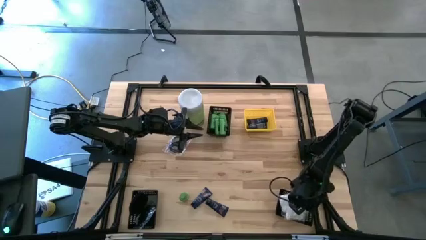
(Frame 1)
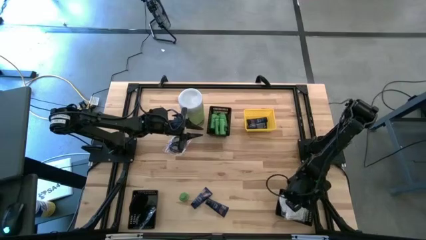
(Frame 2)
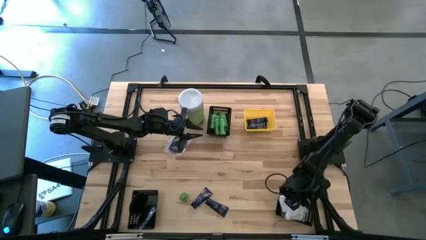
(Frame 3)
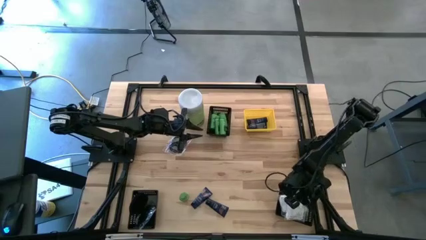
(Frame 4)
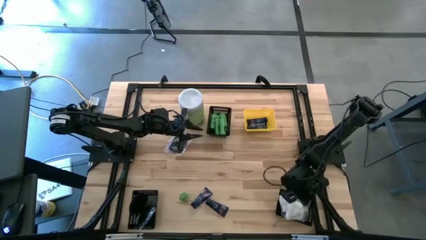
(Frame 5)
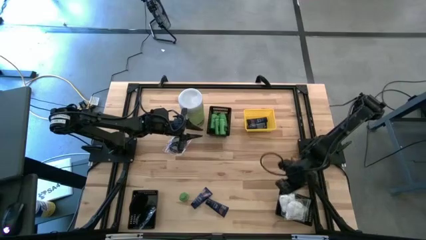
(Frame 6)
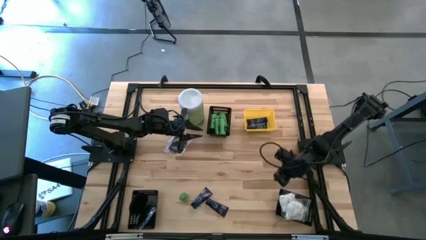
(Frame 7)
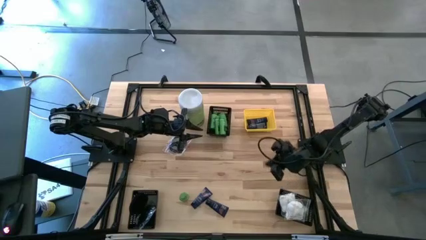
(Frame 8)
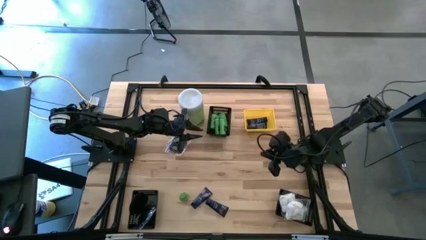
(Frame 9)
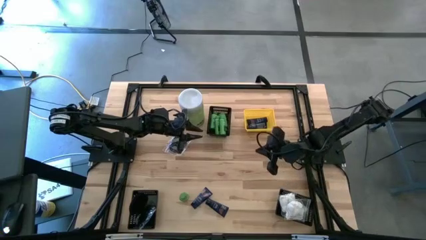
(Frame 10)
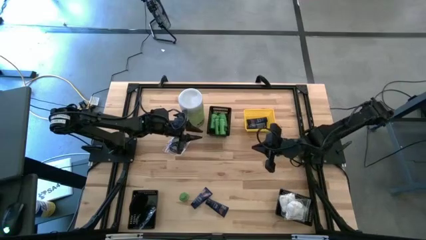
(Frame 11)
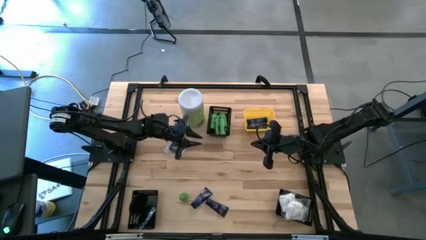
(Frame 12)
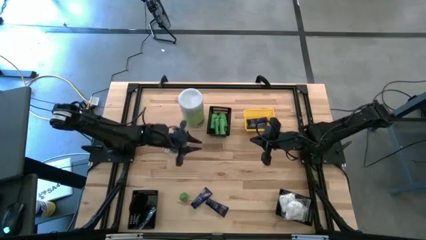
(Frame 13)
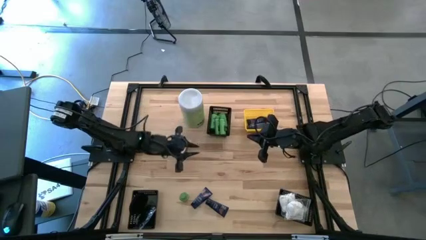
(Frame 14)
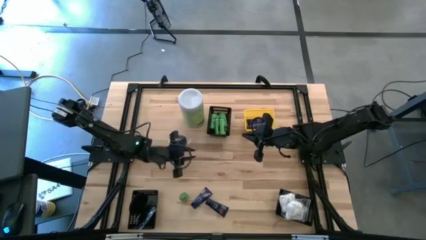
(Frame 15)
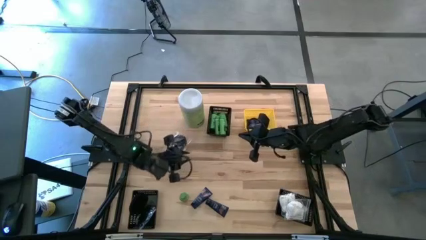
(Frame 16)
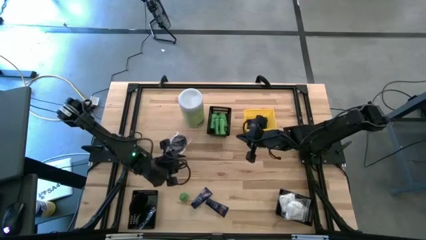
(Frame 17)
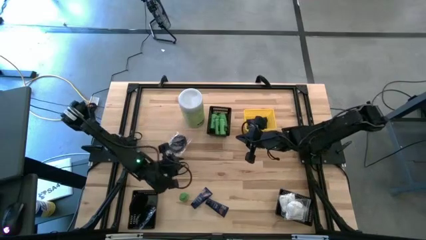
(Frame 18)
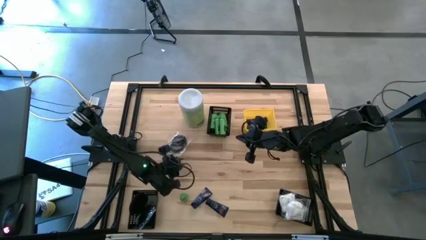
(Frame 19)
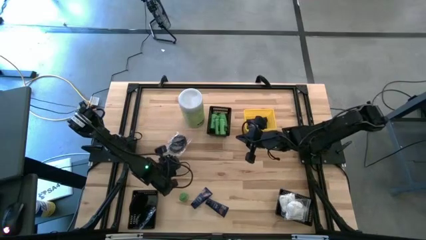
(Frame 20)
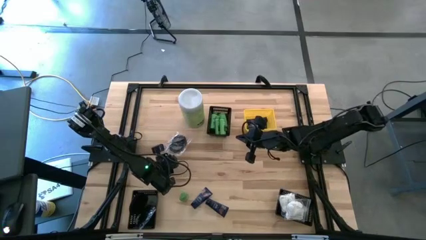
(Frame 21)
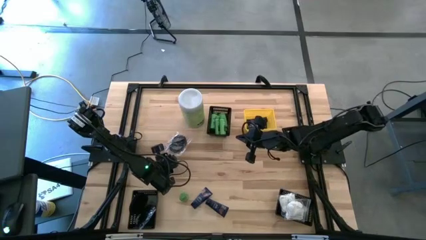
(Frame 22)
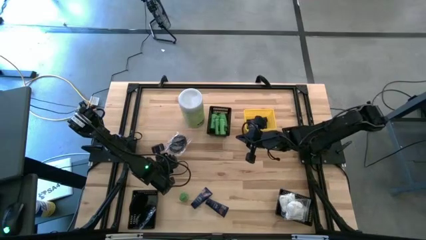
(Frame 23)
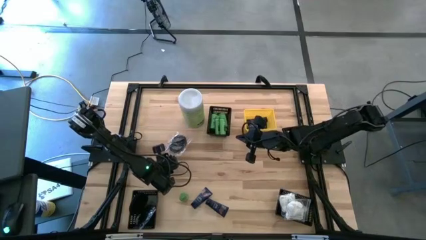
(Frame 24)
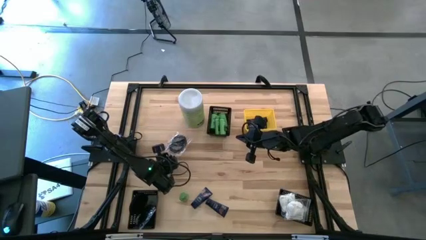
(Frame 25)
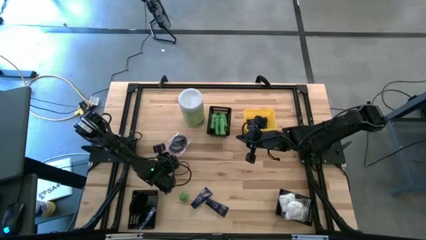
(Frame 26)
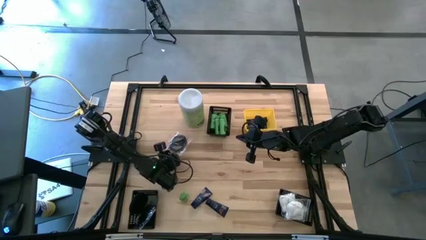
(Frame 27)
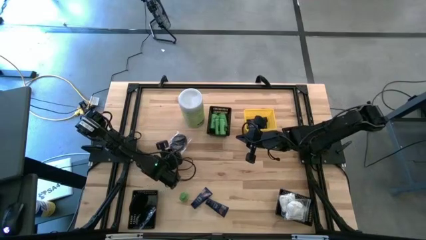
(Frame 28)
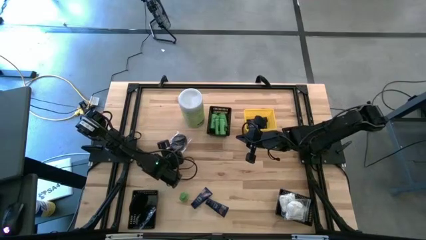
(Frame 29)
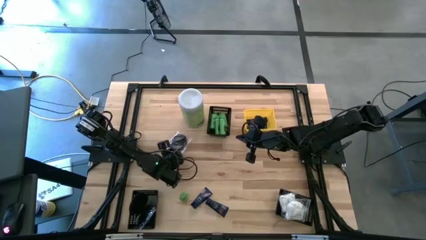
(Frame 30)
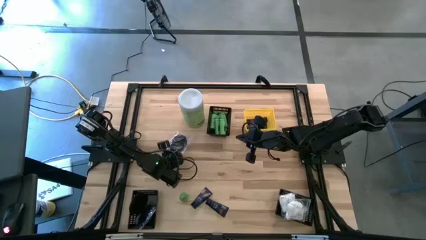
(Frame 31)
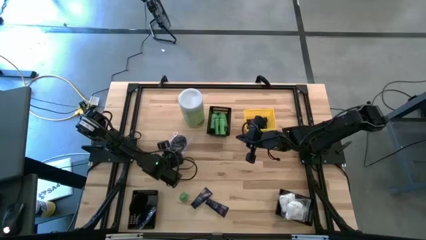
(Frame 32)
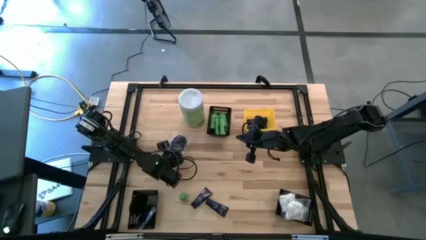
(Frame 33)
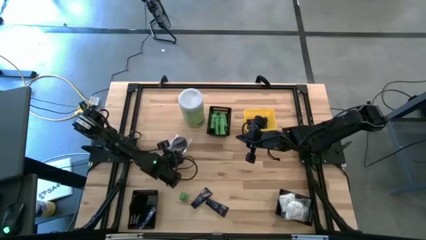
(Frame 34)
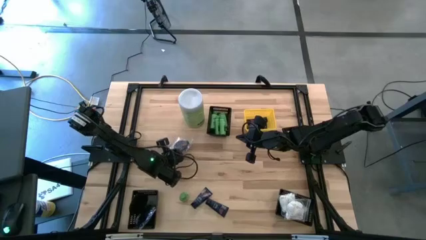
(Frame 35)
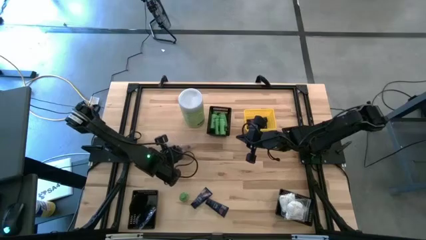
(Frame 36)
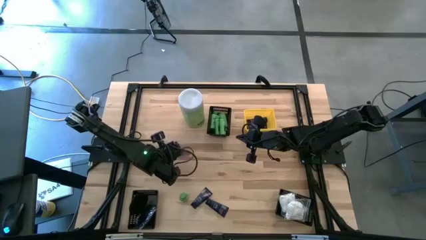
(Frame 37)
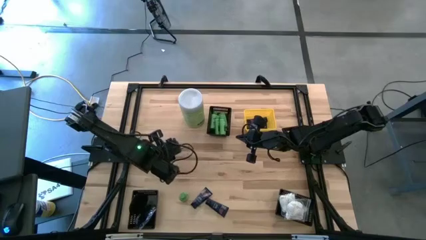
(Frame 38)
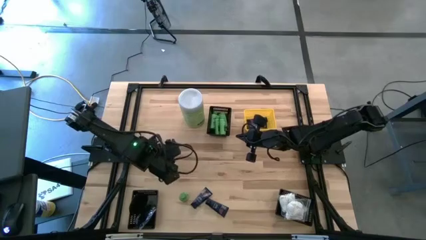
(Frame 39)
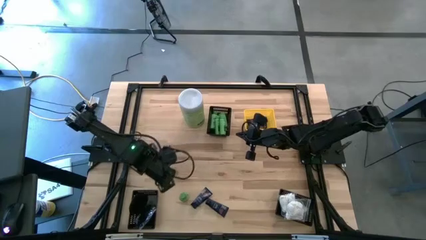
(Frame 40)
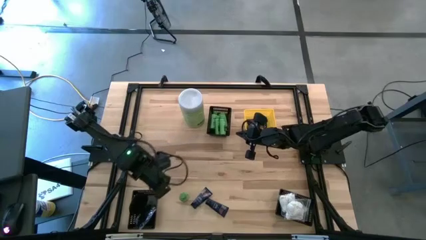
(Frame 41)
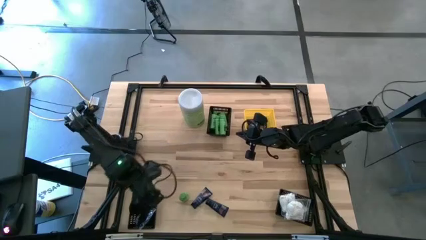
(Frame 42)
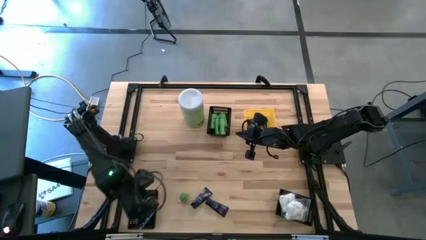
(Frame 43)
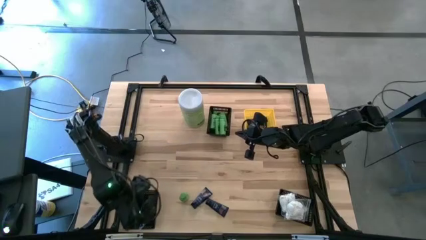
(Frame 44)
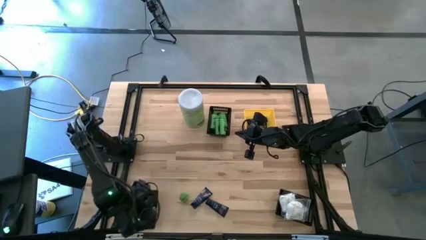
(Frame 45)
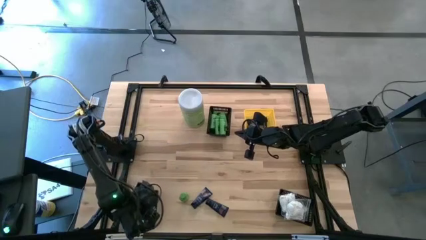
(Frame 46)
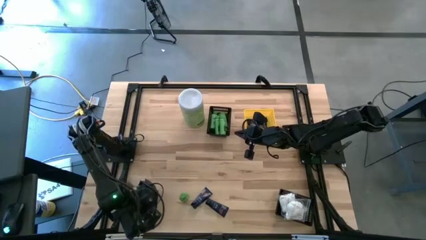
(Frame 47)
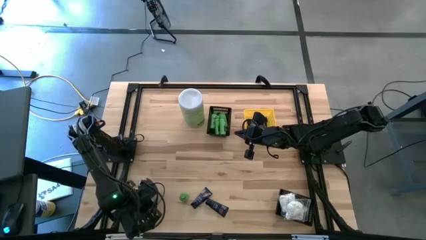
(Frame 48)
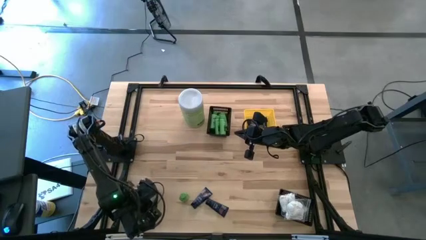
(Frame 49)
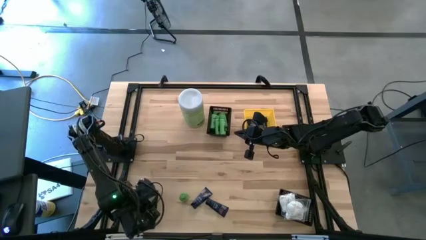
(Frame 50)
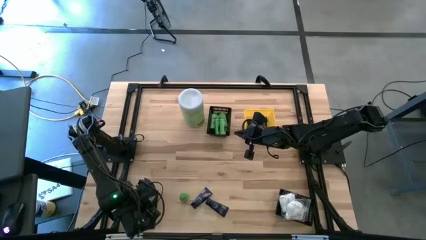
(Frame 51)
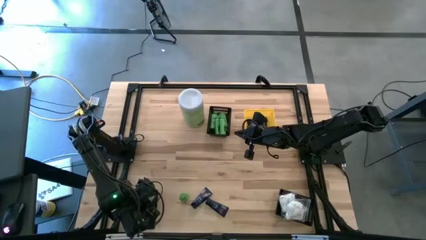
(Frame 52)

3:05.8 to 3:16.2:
Task: Pick & Place Travel size toiletries
Put the black hair brush into the bottom left black bin
